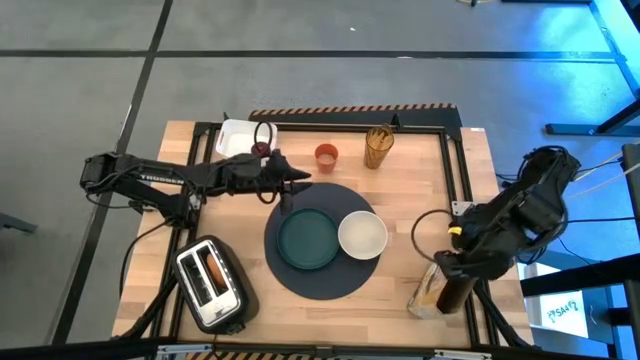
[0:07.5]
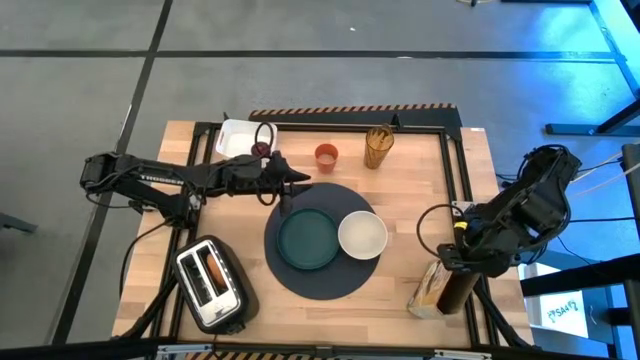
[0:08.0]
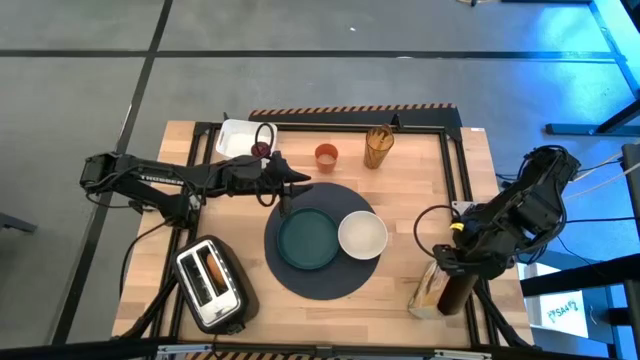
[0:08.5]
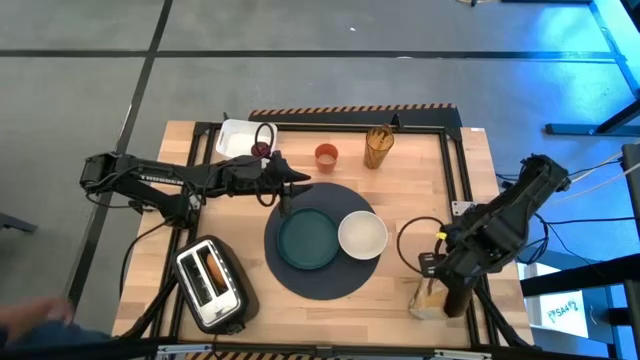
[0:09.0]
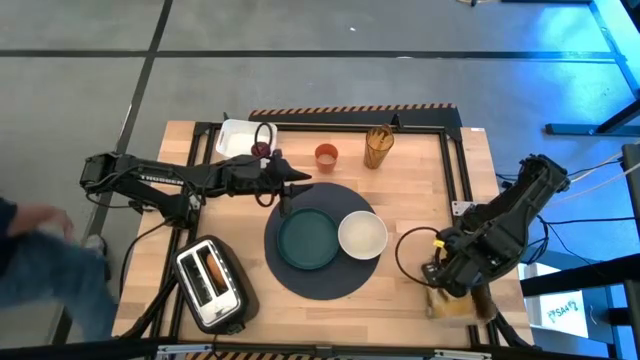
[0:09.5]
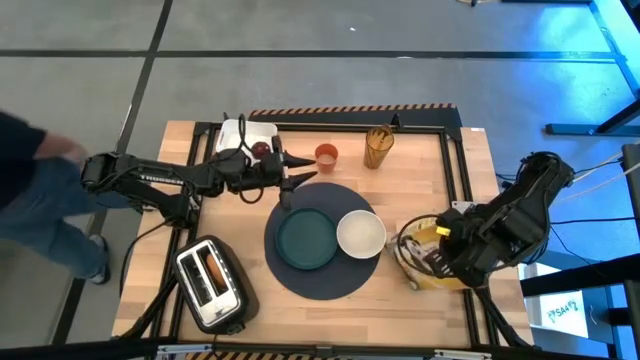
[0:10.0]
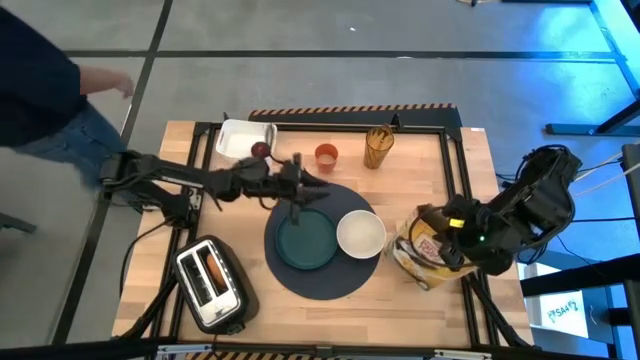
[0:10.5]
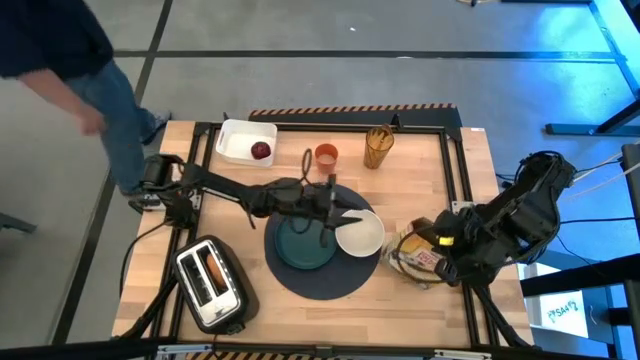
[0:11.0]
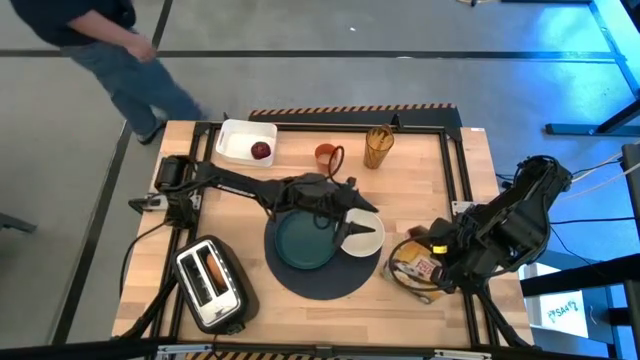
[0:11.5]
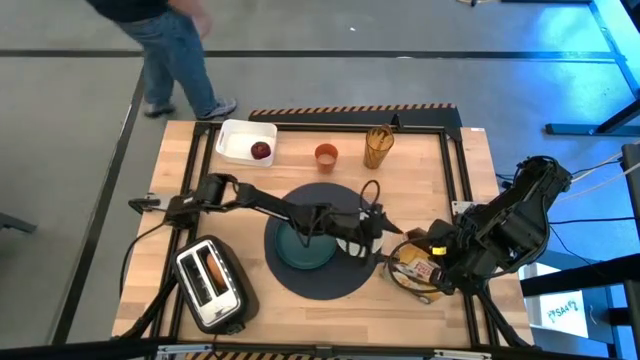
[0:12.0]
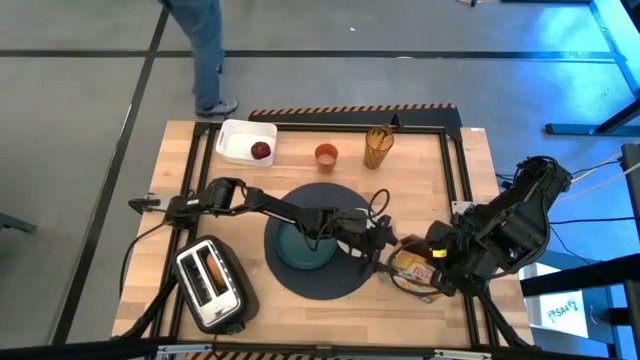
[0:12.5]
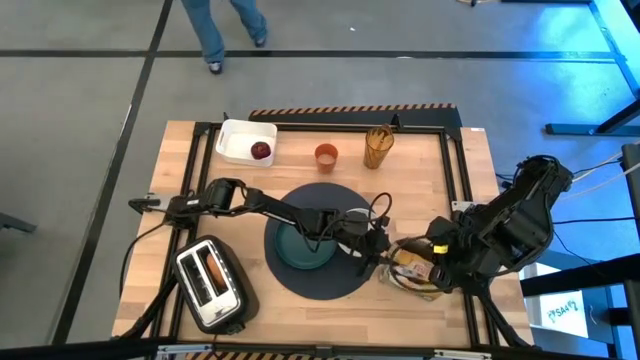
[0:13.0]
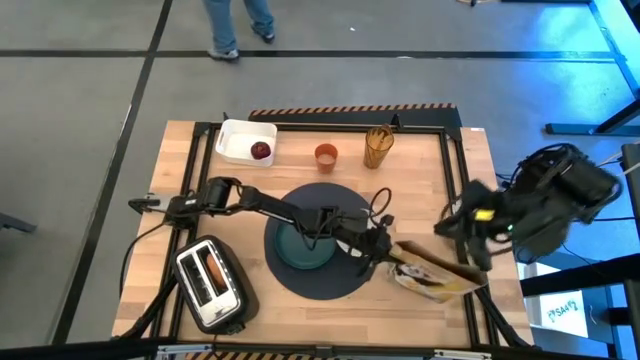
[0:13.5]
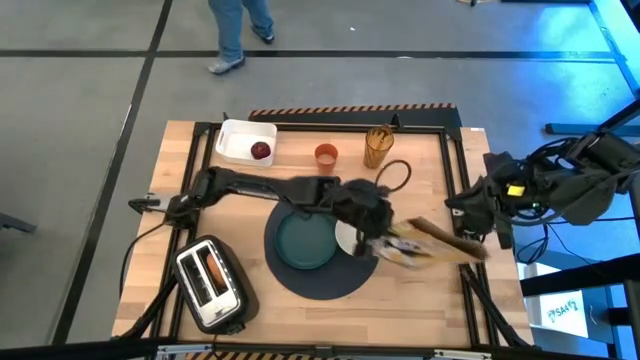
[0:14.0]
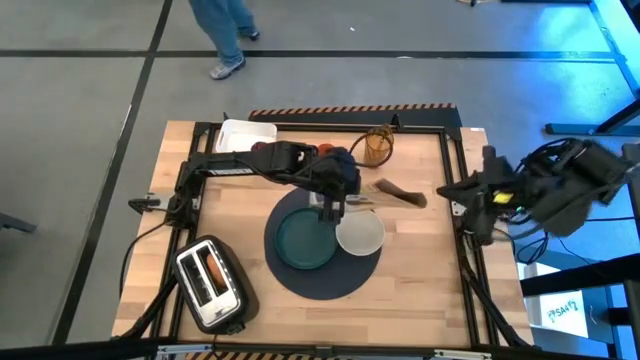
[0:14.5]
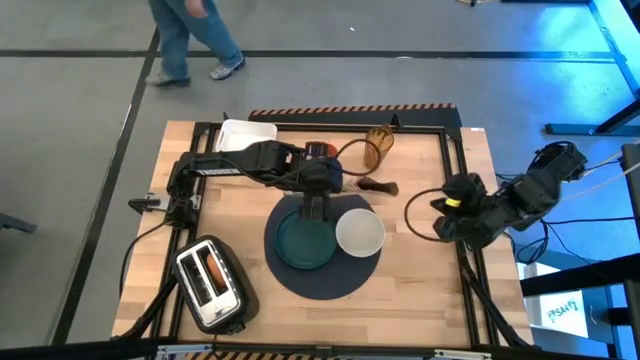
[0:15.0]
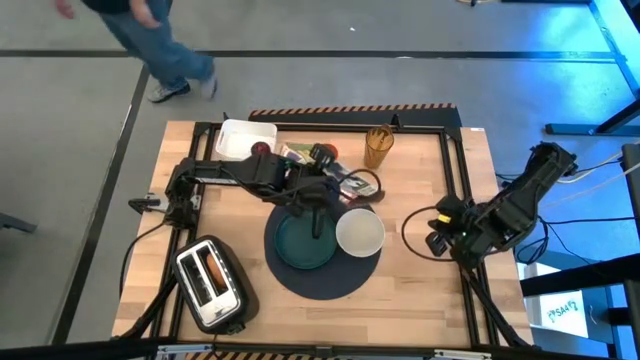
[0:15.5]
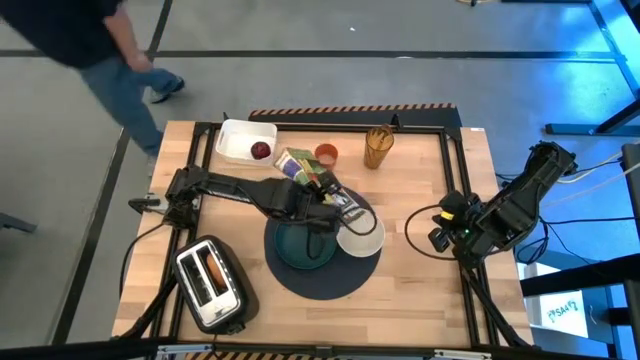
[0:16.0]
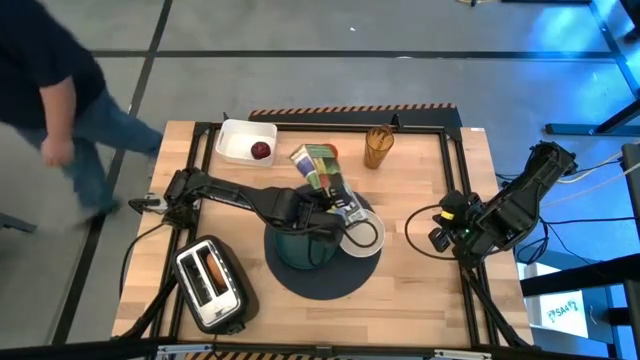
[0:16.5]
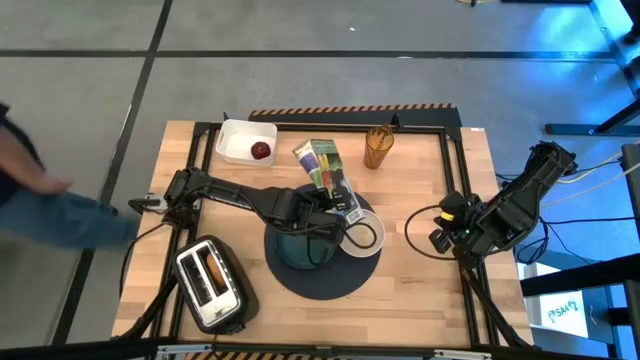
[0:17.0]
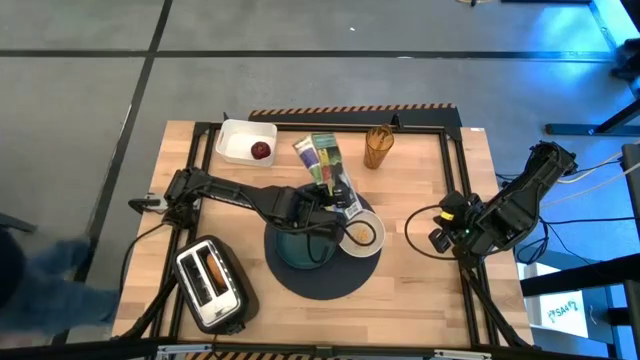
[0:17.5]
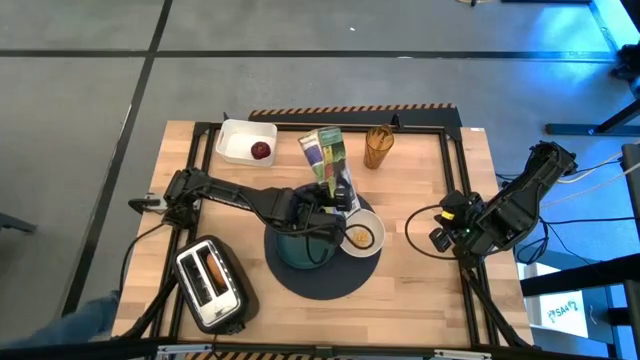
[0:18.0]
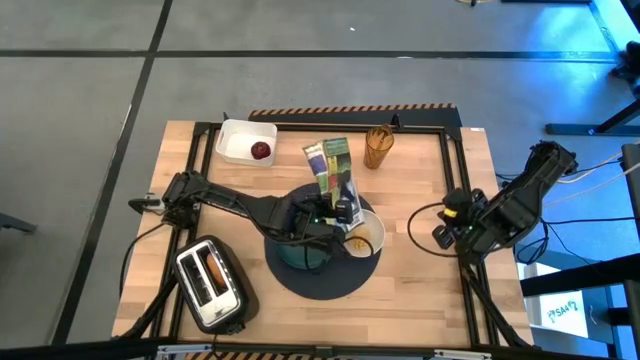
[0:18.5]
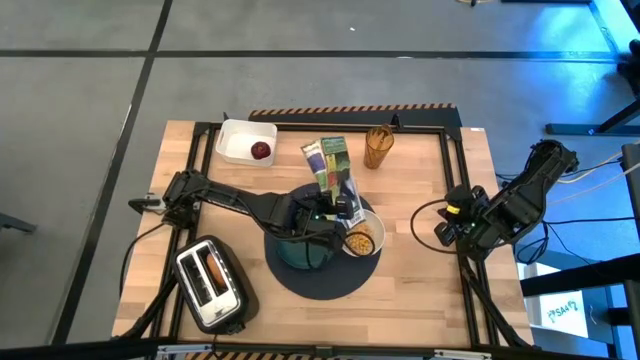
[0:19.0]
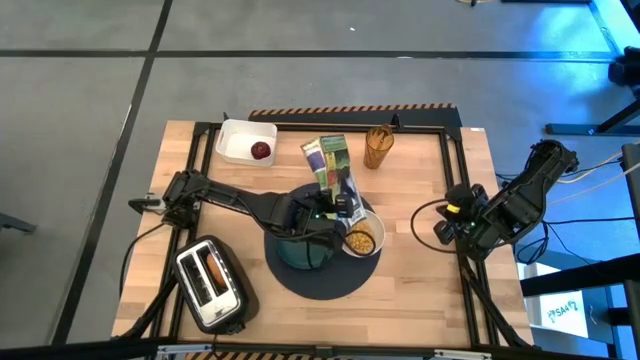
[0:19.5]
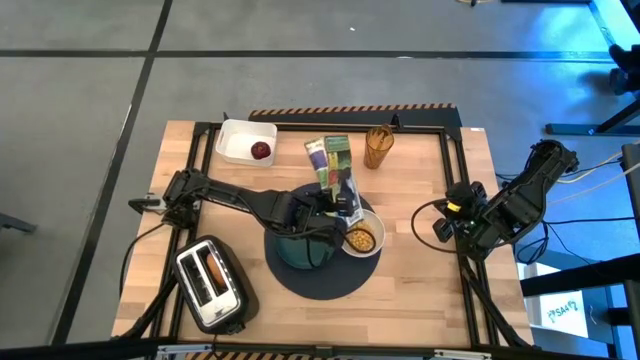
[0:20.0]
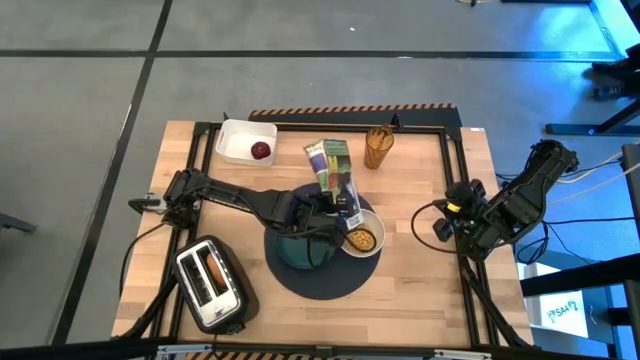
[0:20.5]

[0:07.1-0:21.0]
Task: Arrange a breakfast setting
Pour the cereal into the white bowl
